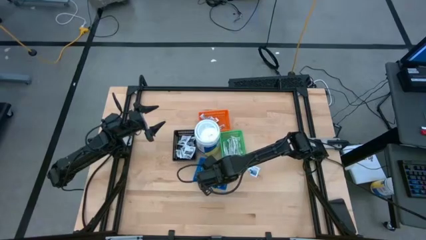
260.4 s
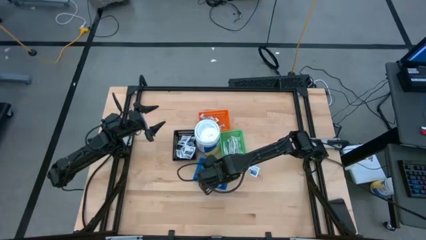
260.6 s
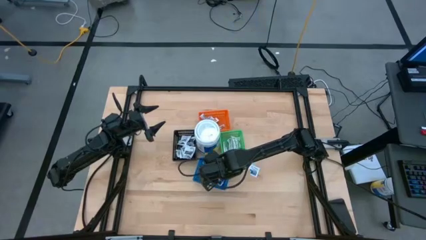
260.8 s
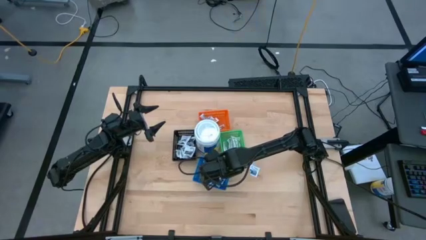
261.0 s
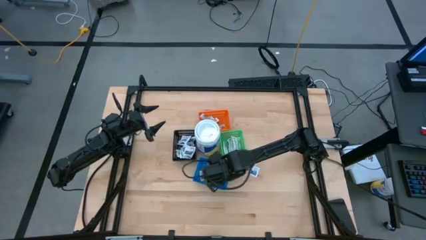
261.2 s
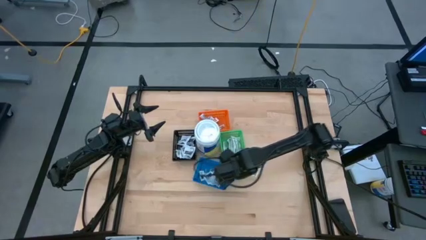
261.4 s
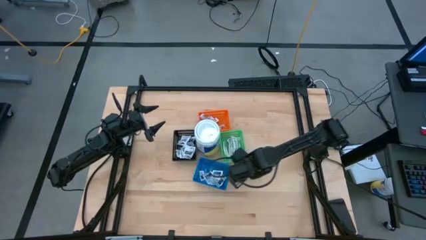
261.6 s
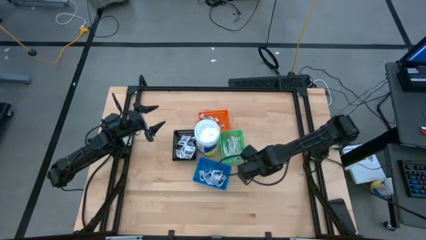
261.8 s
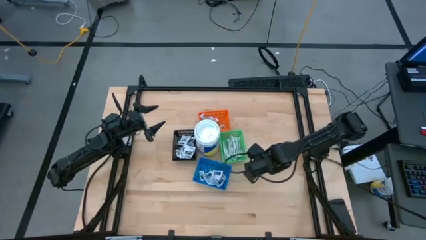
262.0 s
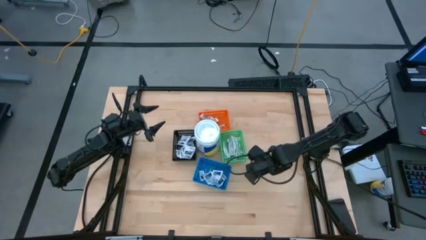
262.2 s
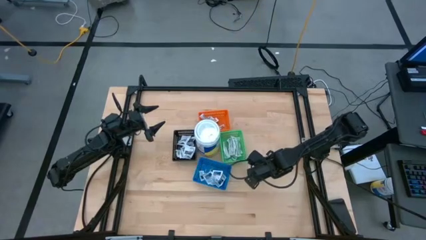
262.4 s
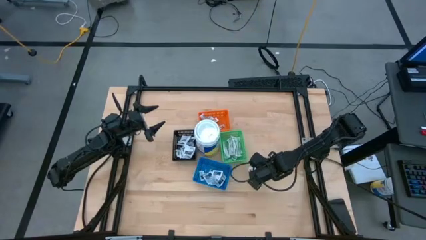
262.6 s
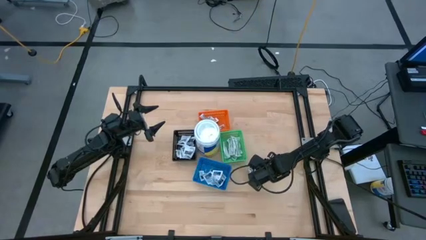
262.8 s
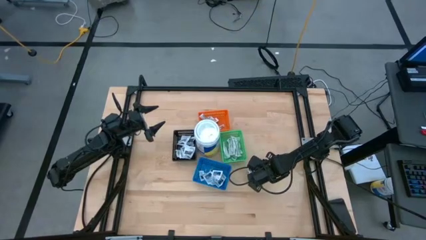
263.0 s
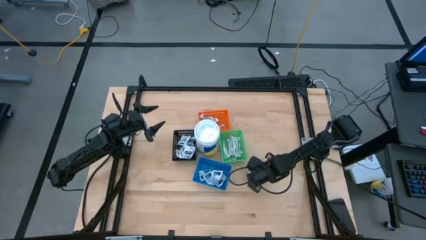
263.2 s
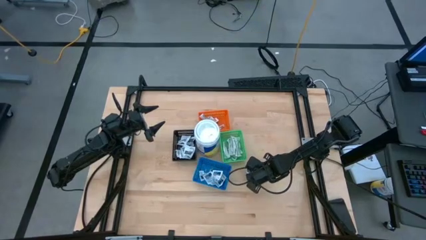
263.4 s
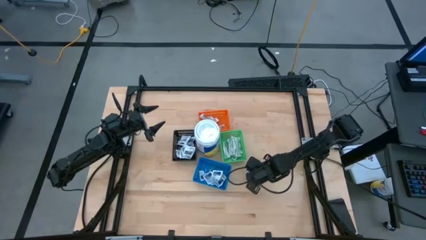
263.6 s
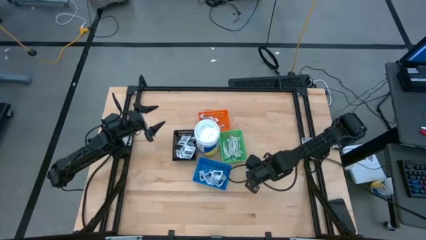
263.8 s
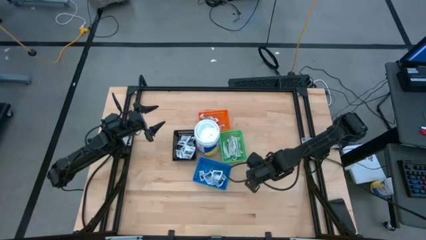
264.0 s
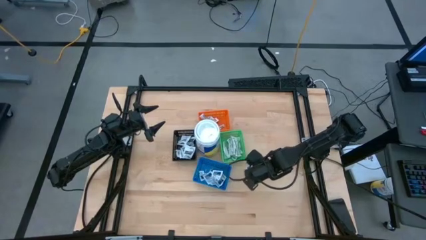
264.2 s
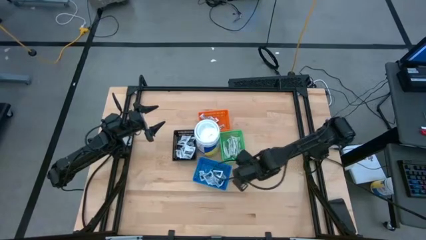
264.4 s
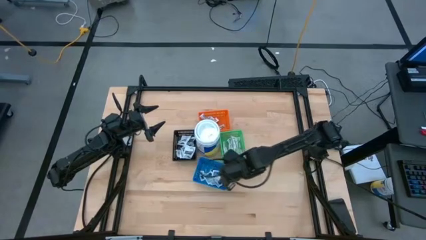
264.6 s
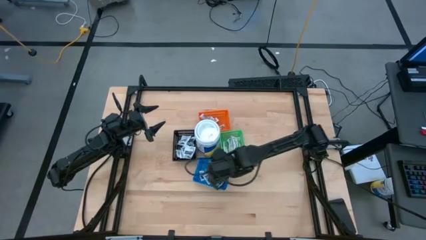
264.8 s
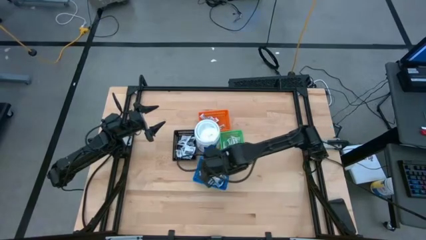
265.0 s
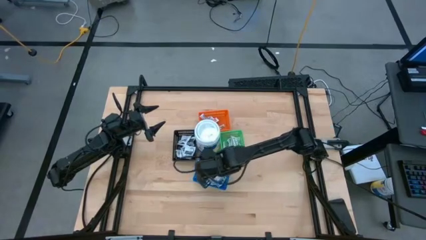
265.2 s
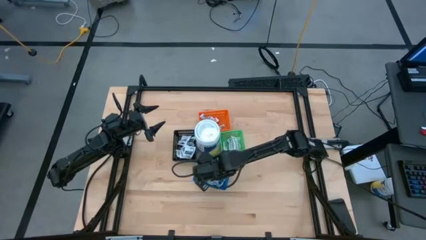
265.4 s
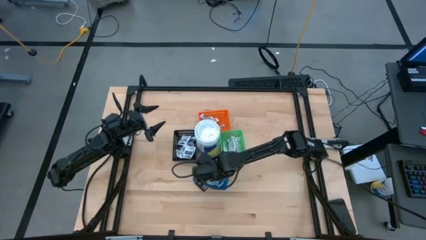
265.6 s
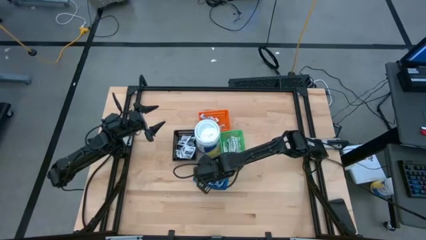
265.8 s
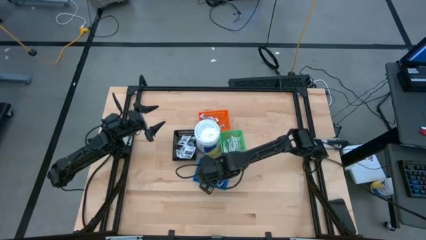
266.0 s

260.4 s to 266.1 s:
Task: Pick & Place First Aid Supplies
Put the blue alcohol pad into the blue bin

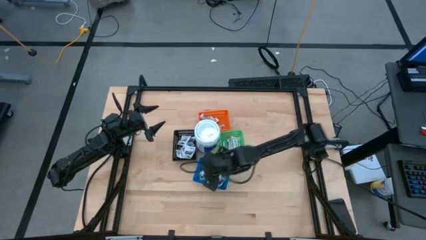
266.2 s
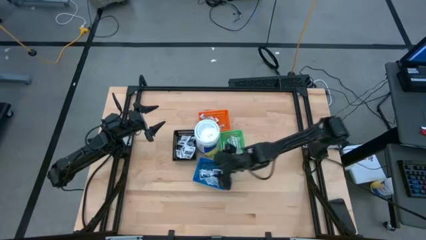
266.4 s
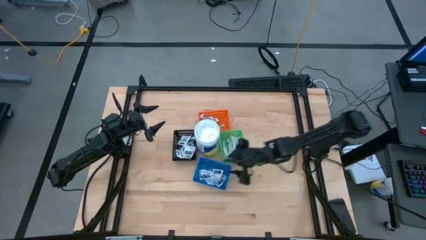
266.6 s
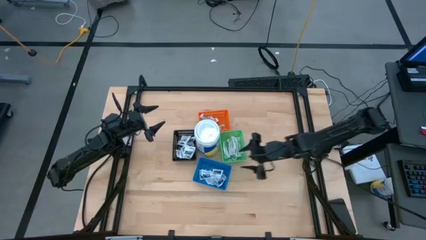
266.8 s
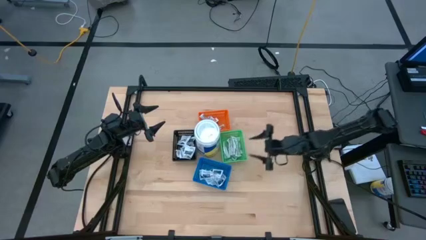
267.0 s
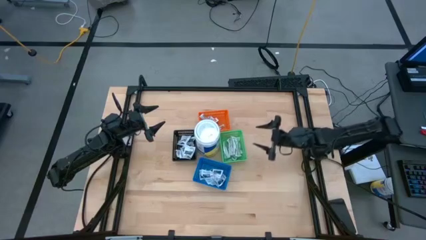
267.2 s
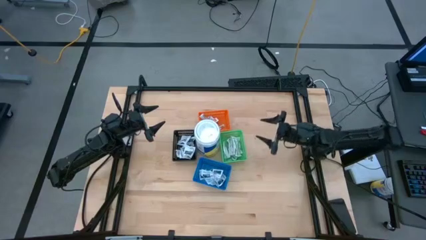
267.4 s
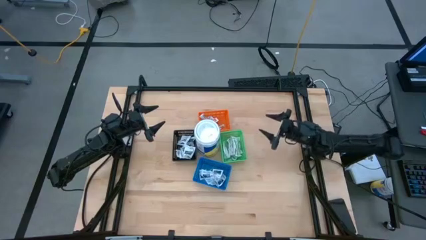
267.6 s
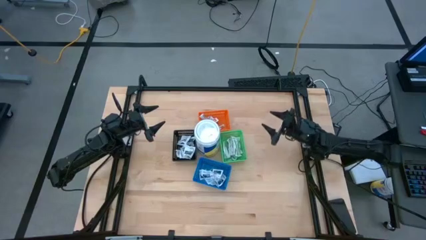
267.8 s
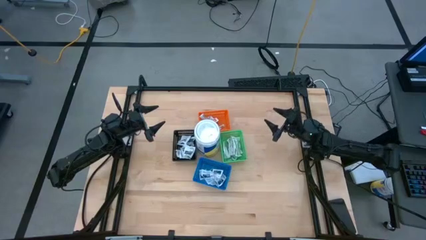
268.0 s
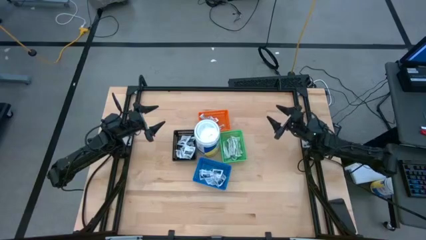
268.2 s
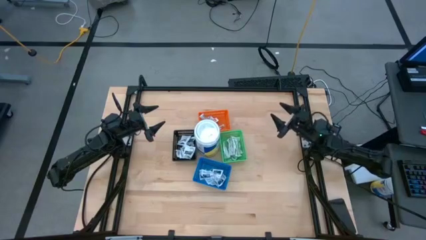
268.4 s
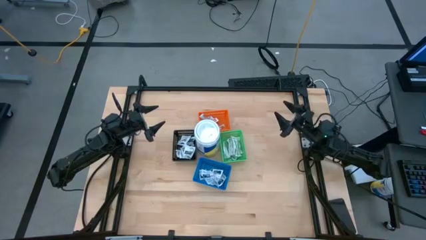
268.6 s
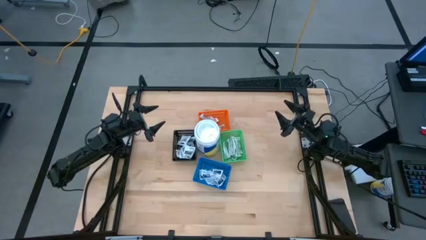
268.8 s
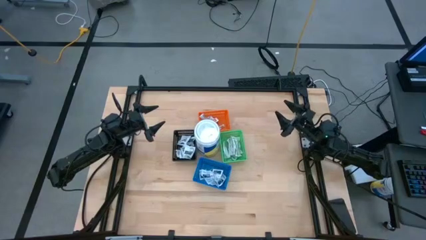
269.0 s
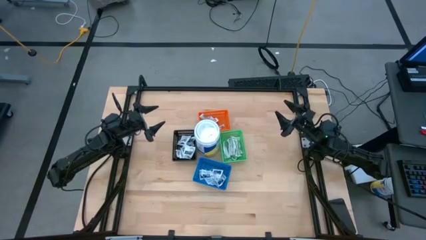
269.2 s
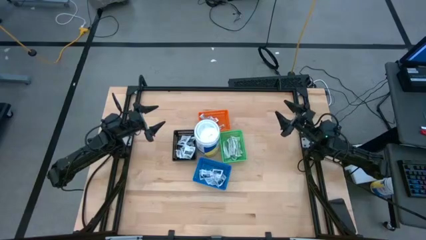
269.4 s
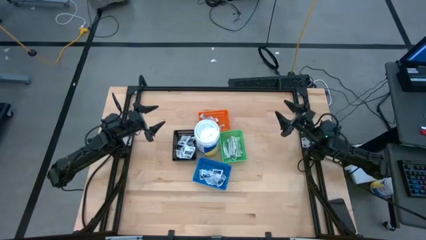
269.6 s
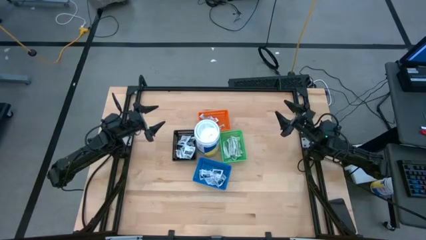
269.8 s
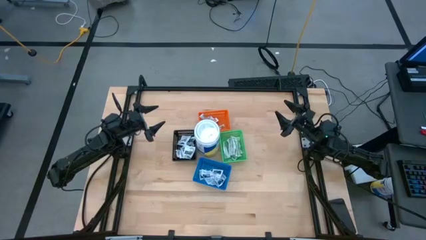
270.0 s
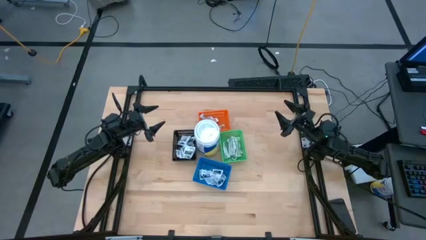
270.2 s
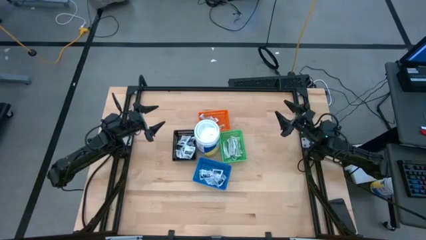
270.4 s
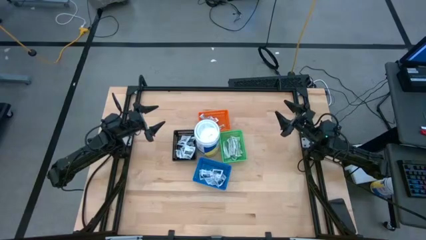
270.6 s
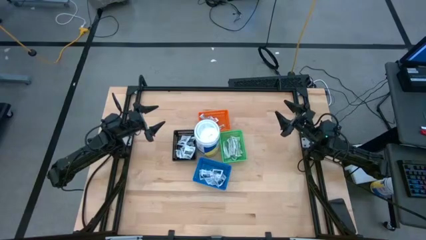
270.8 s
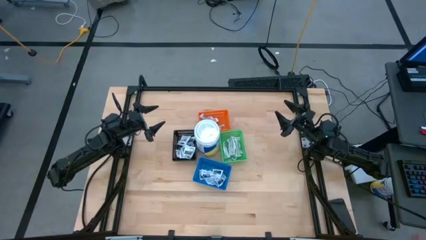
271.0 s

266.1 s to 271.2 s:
Return to Home Position

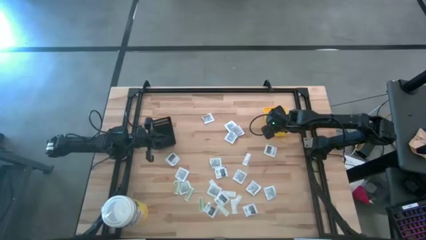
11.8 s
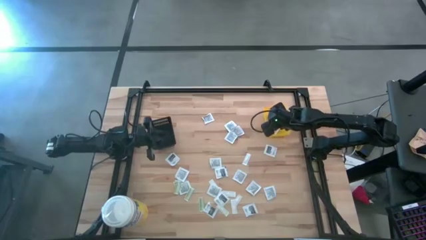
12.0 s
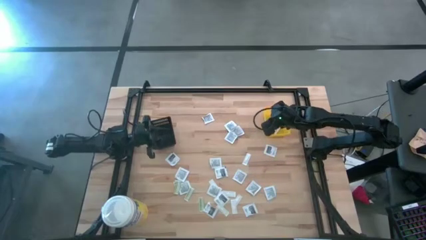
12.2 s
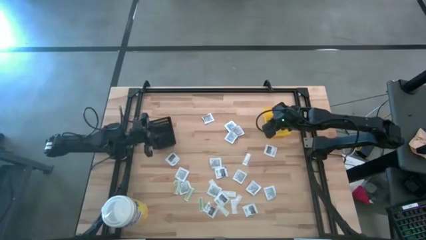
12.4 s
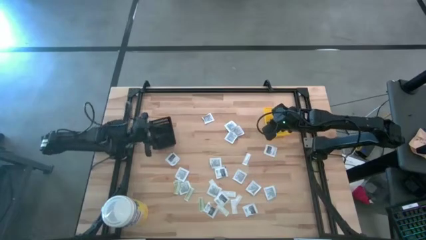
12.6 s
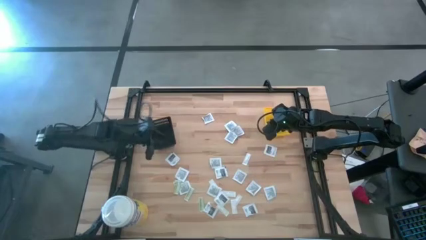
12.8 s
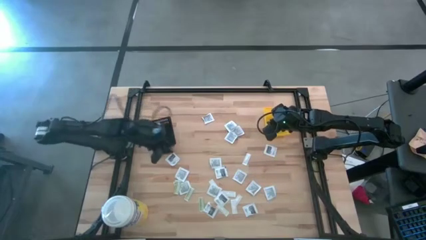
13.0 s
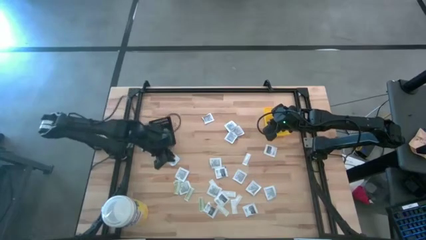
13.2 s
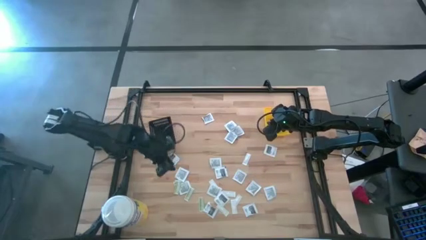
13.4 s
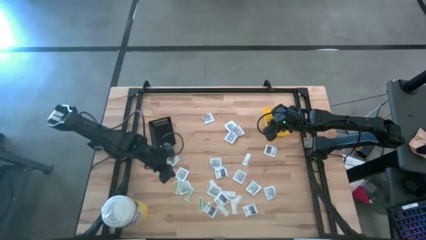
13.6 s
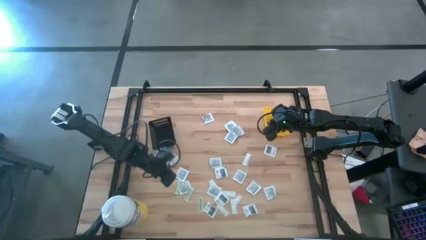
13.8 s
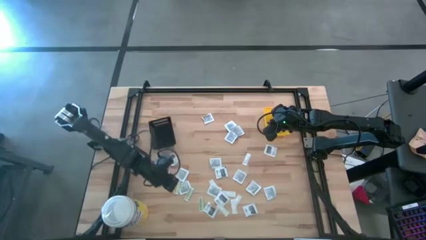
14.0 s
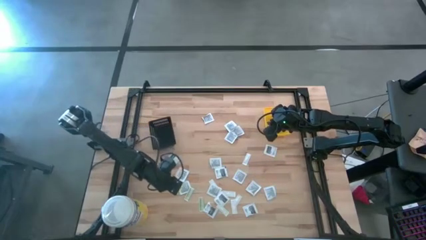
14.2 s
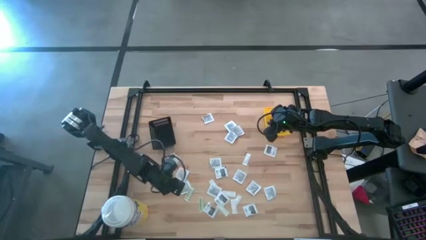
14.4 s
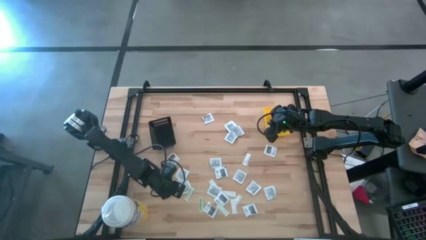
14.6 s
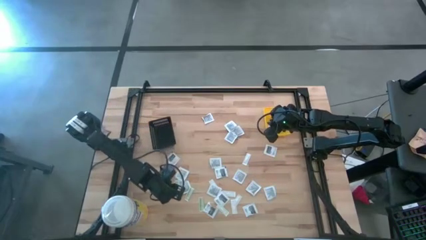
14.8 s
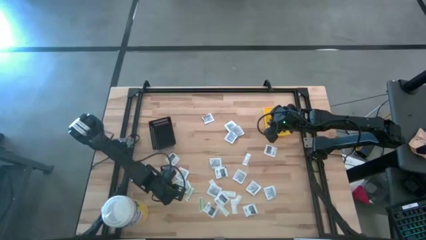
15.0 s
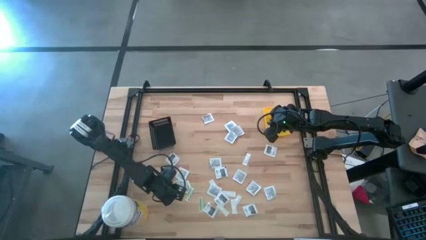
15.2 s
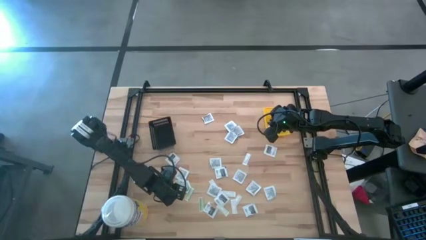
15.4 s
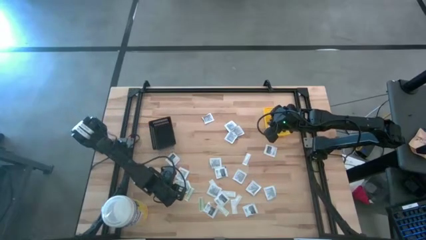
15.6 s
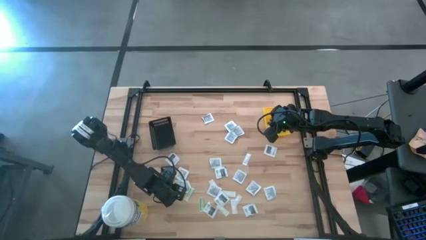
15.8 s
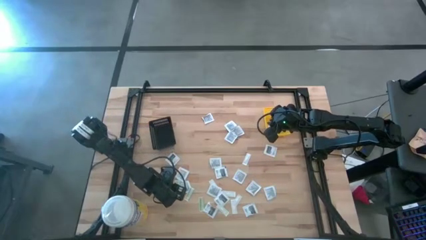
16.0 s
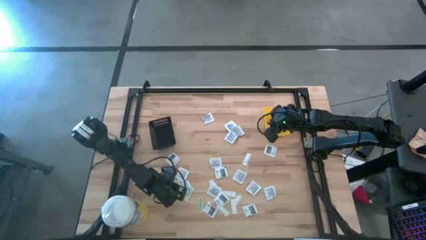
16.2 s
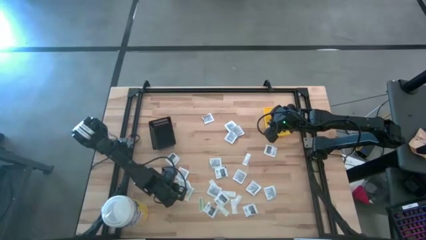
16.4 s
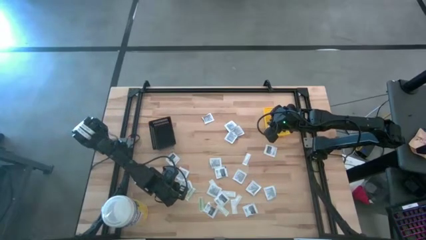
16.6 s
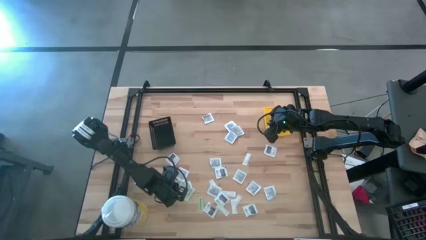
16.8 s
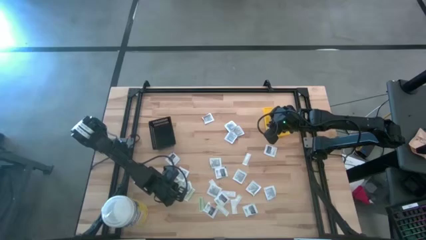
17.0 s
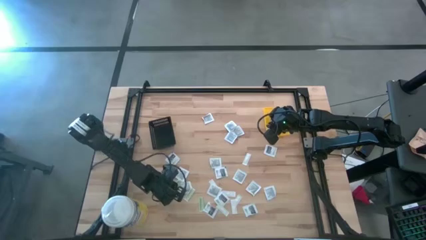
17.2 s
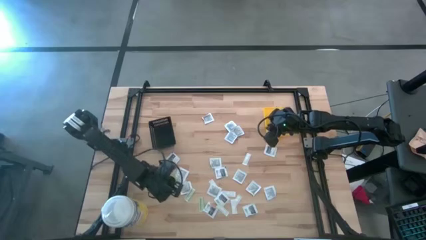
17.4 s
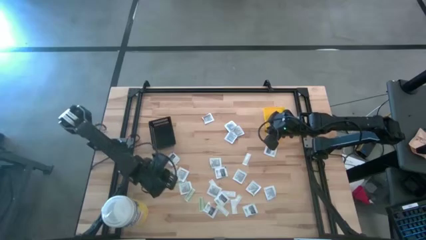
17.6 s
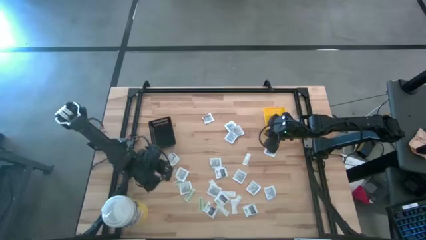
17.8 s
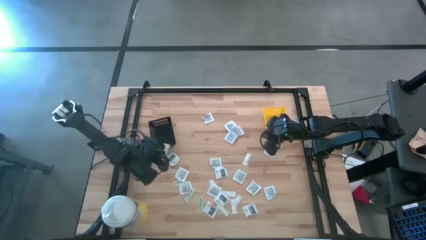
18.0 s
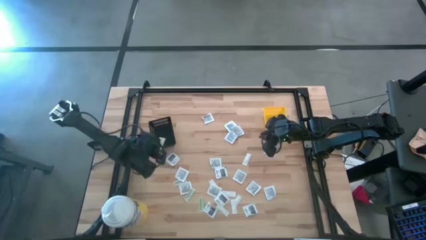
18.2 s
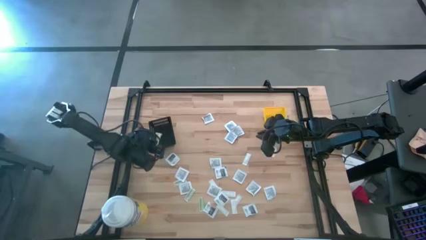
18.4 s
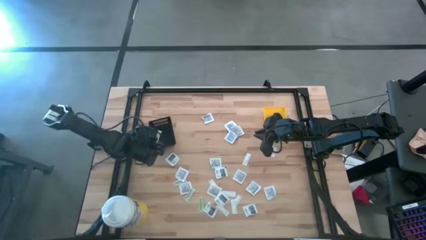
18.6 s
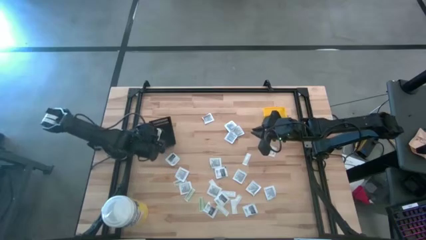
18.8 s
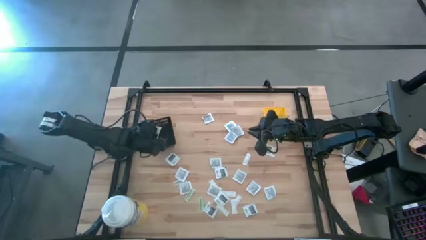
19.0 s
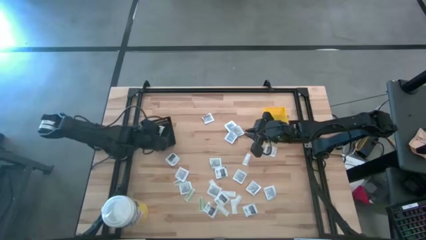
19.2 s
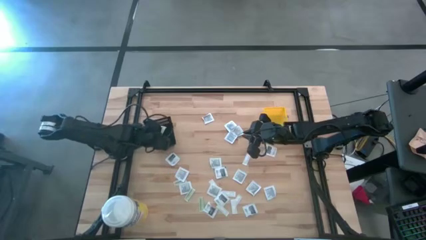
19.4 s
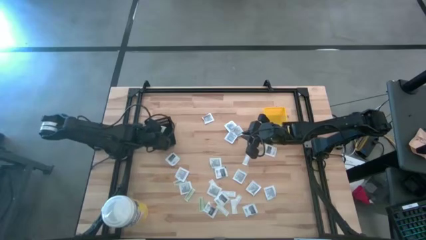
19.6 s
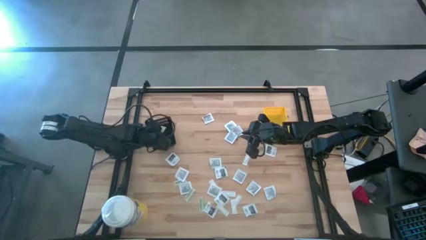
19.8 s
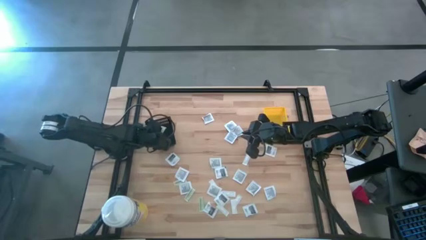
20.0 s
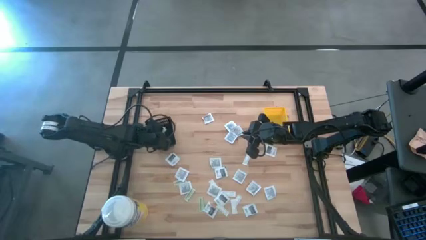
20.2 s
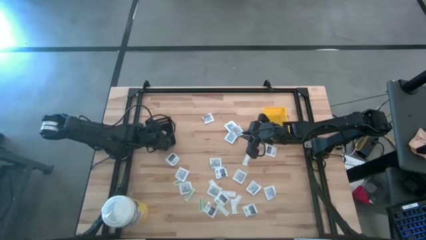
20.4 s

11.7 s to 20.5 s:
Task: Pick & Place First Aid Supplies
Put the green bandage into the black bin
